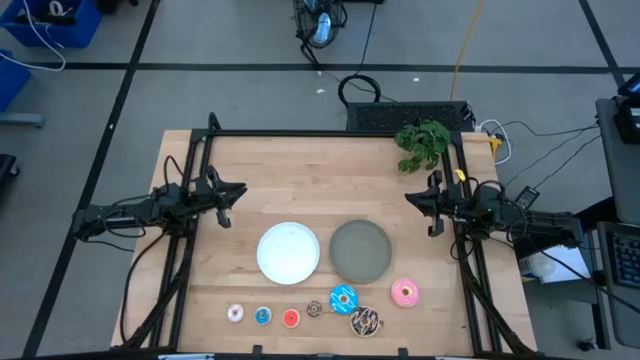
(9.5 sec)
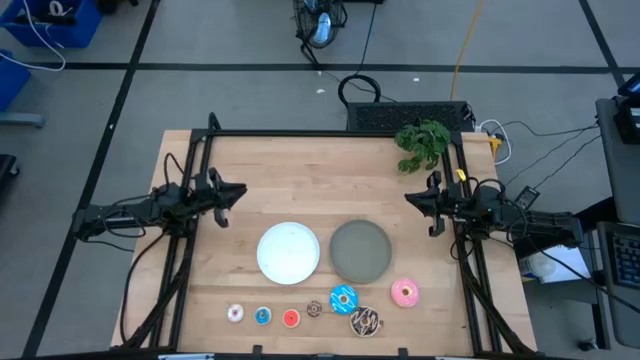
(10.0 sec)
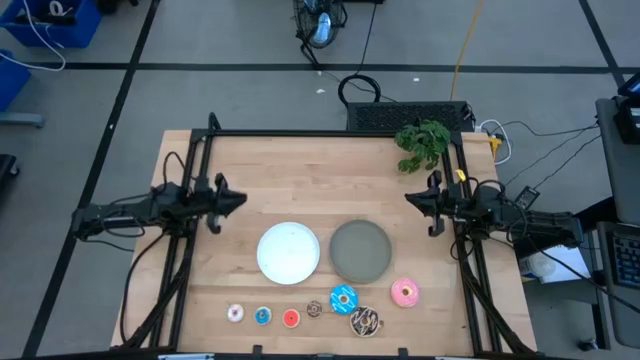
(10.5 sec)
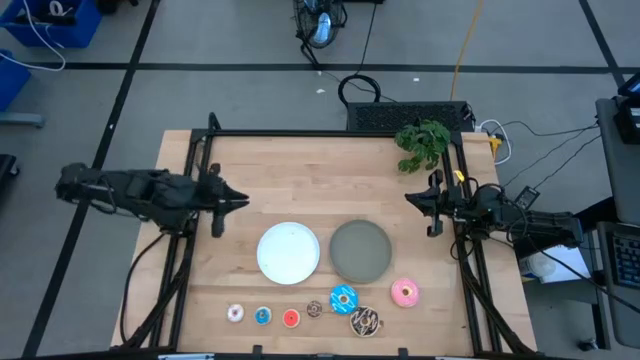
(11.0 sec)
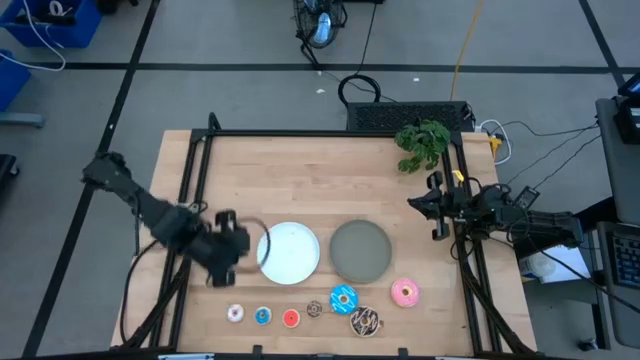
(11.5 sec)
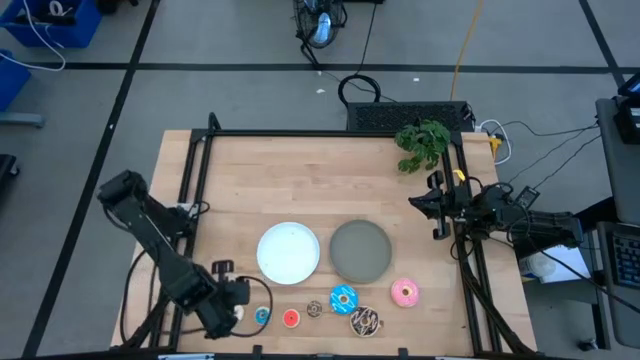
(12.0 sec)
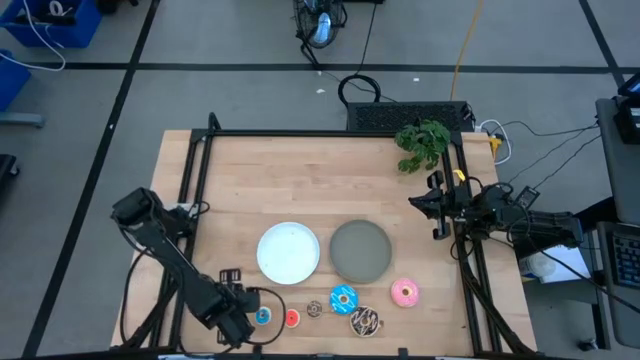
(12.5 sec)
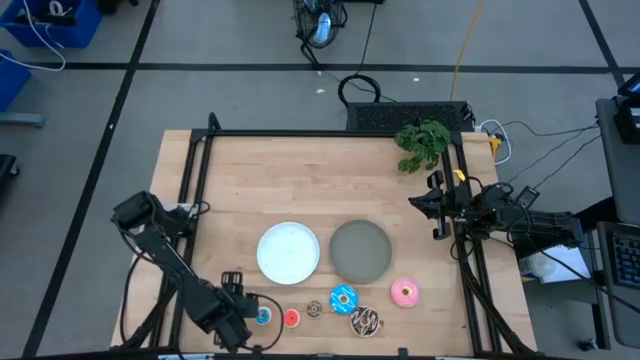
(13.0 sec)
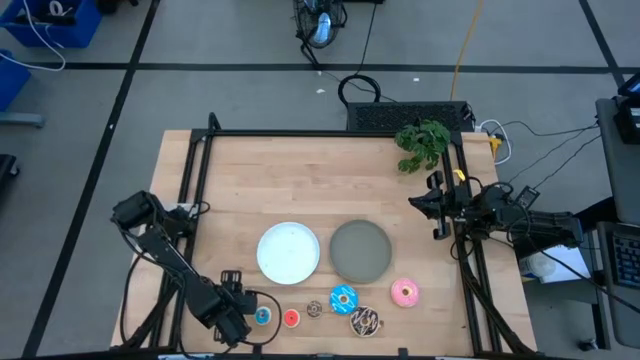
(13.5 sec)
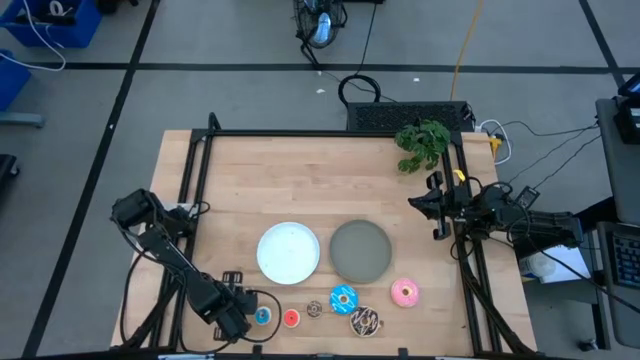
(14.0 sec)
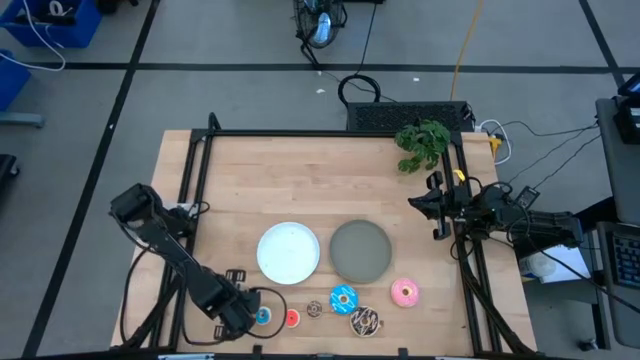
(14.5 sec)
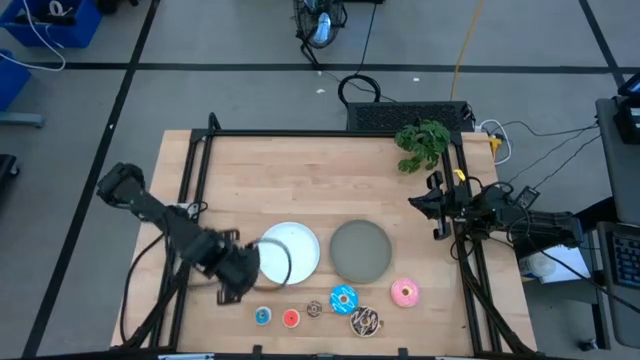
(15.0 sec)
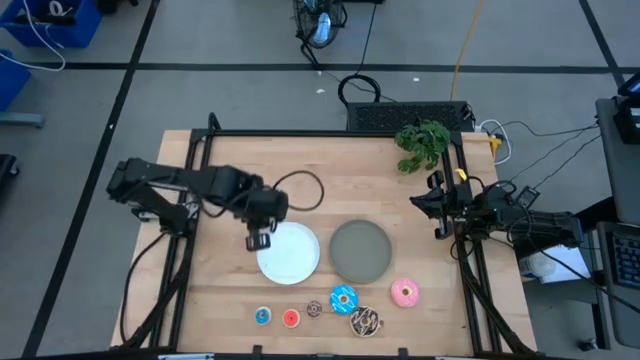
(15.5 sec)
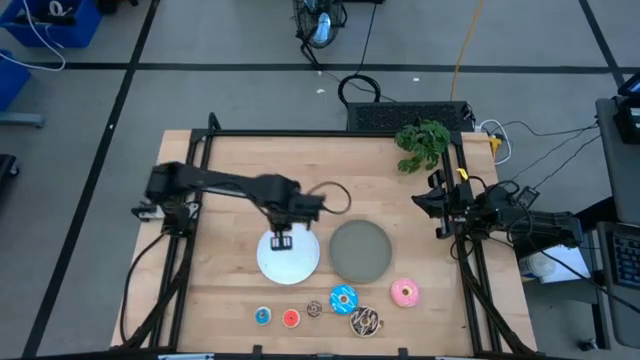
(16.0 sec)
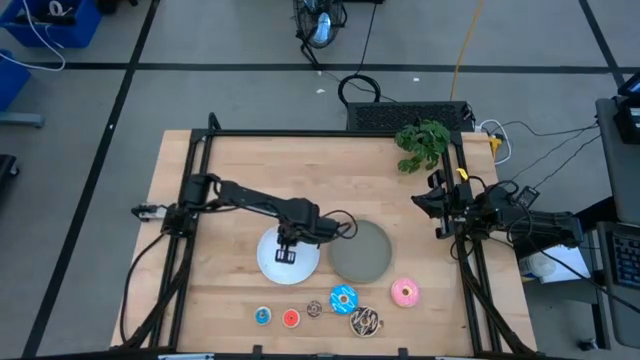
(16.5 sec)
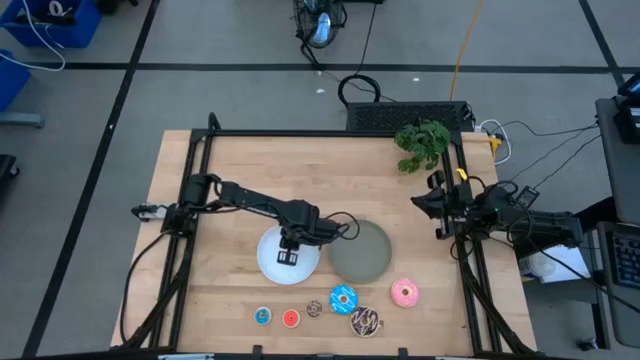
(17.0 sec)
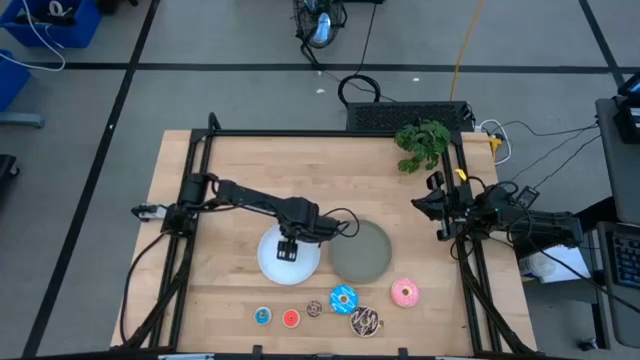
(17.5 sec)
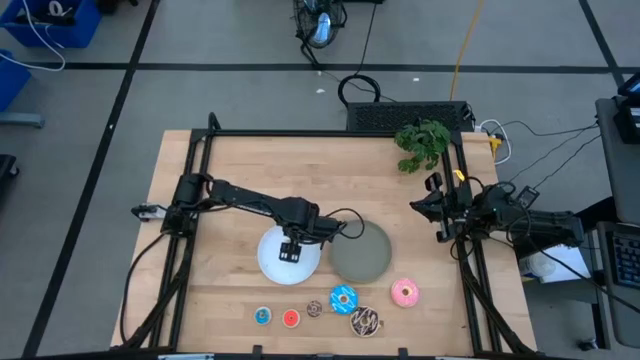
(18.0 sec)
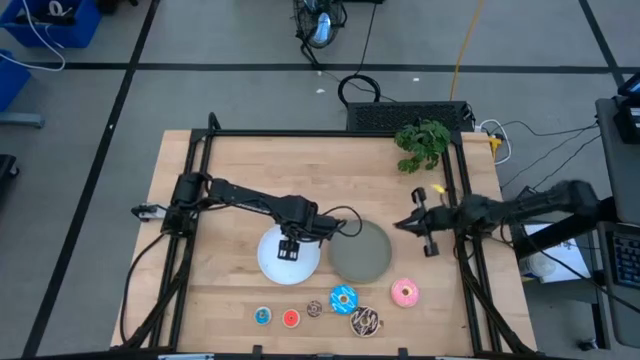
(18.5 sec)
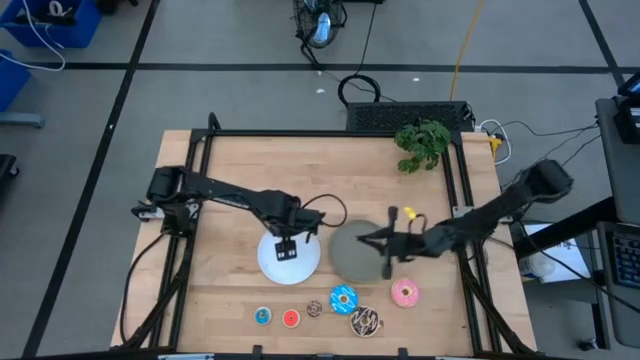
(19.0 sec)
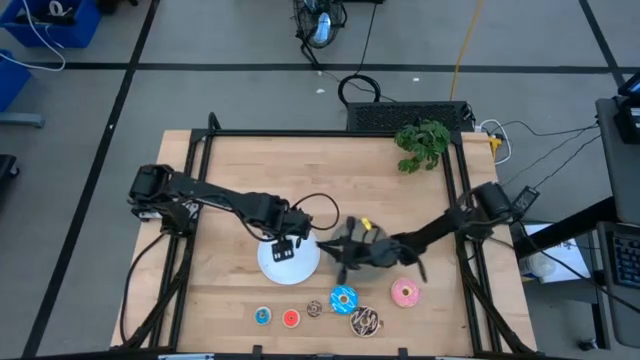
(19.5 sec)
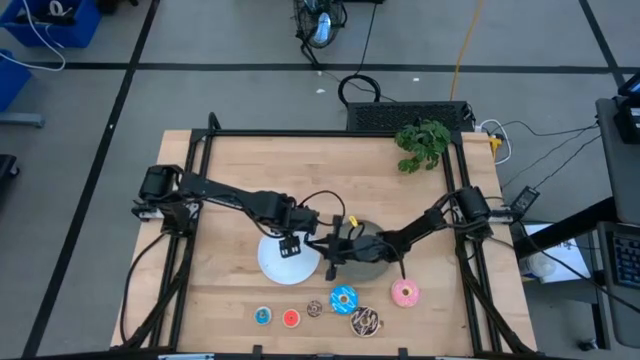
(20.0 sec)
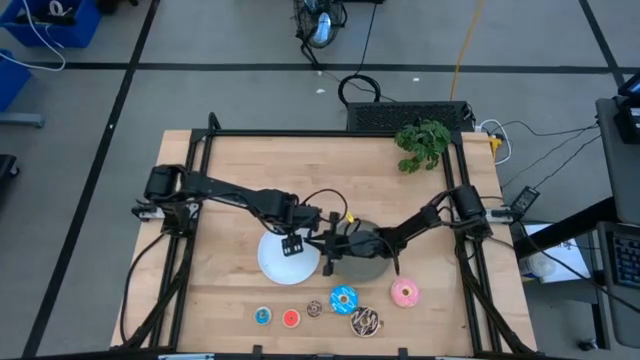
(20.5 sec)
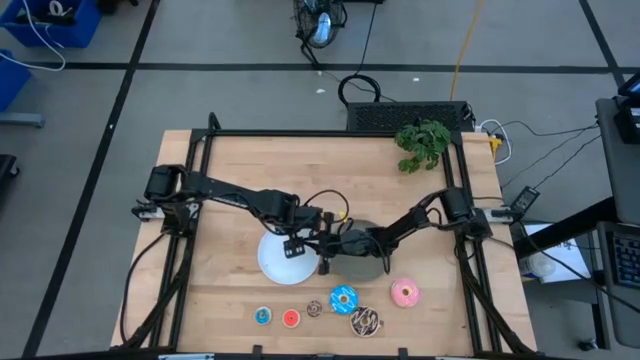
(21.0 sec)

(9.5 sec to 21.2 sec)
Task: Pick & Place donuts
Put the small white donut on the white plate

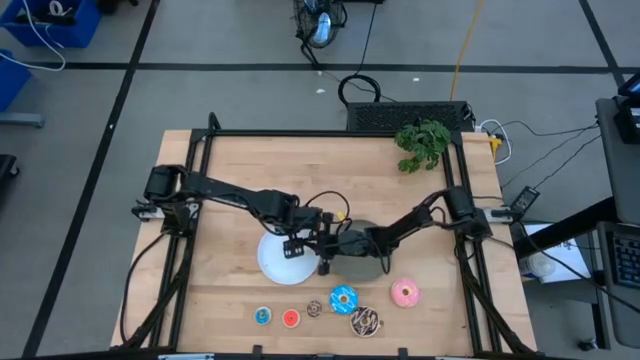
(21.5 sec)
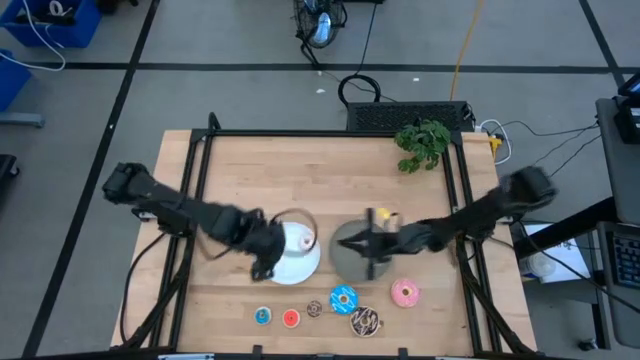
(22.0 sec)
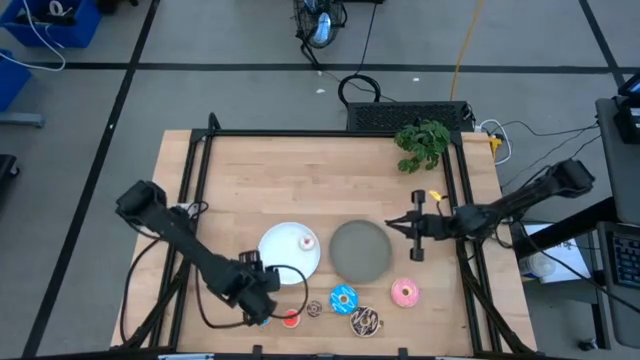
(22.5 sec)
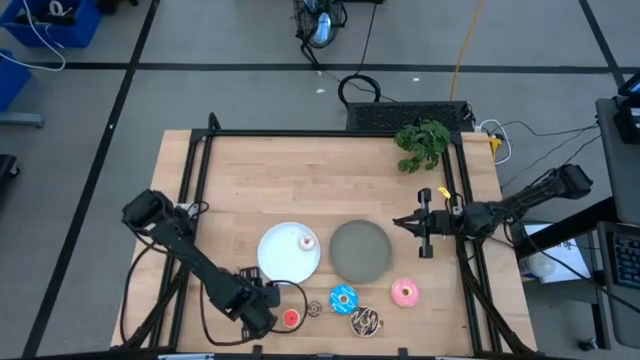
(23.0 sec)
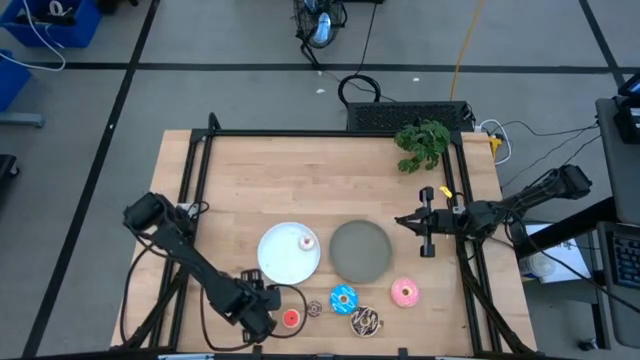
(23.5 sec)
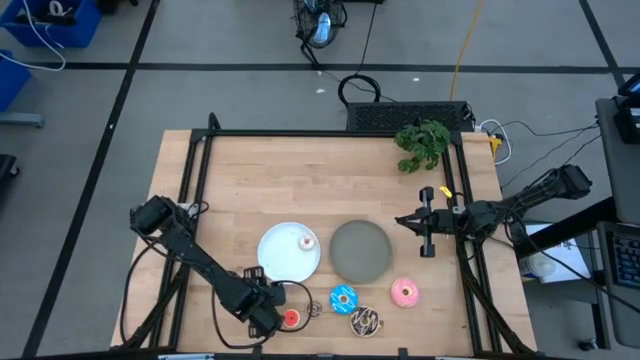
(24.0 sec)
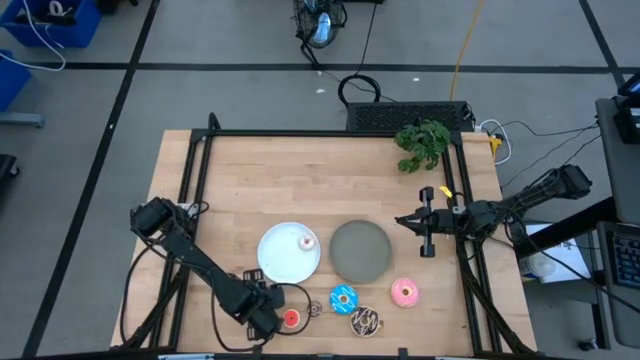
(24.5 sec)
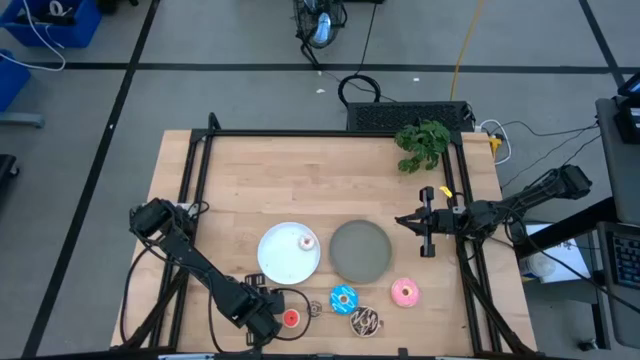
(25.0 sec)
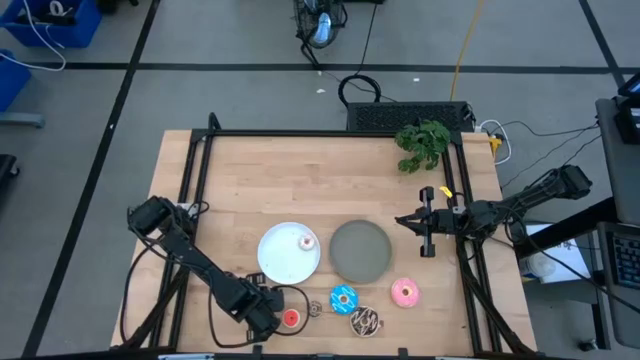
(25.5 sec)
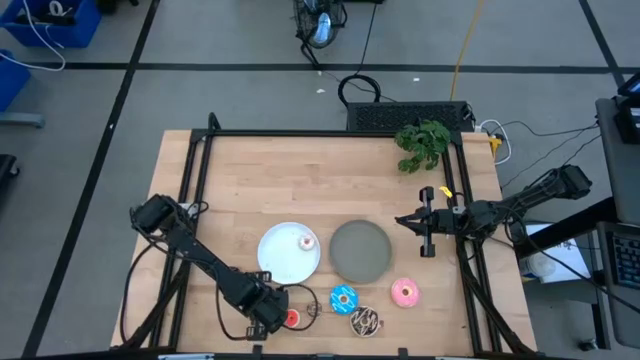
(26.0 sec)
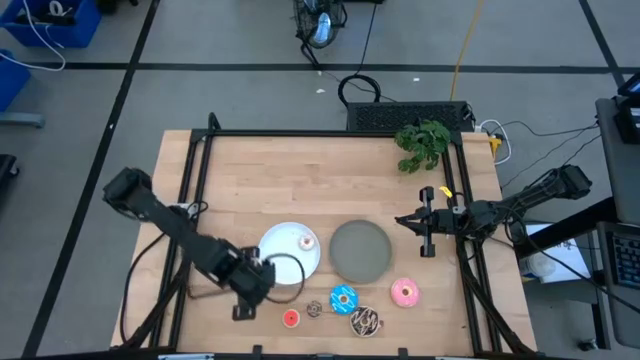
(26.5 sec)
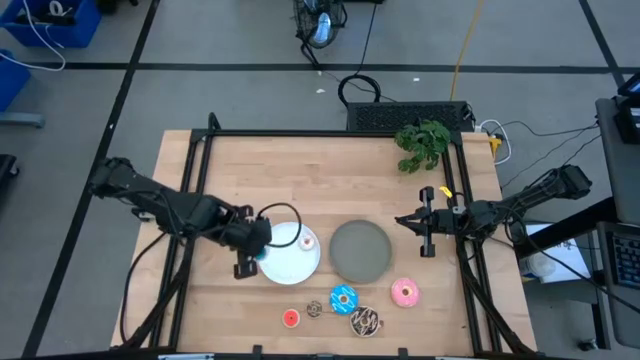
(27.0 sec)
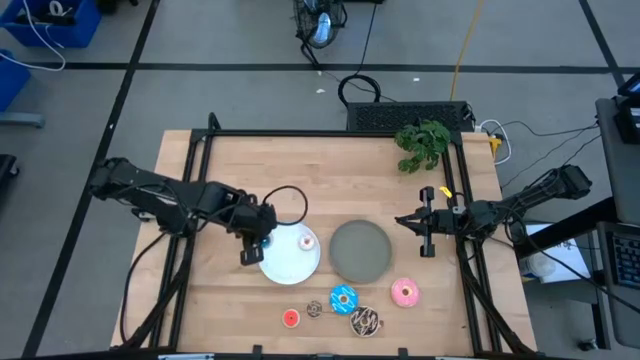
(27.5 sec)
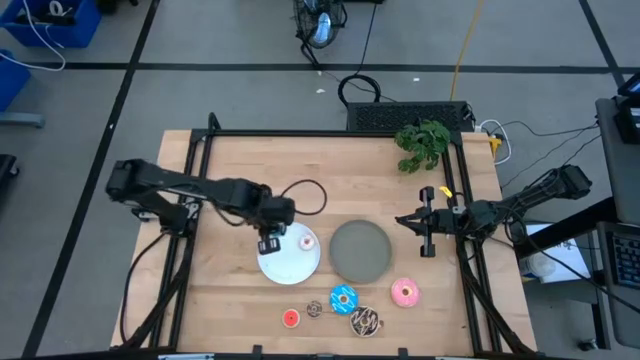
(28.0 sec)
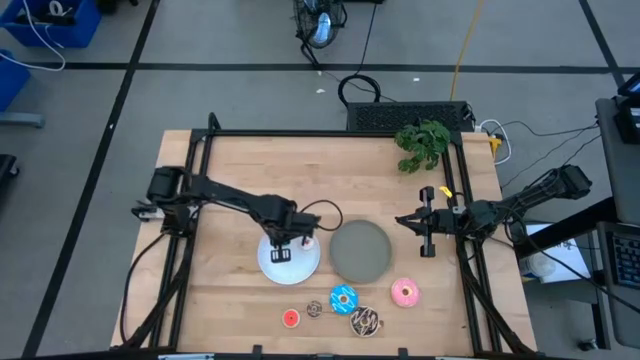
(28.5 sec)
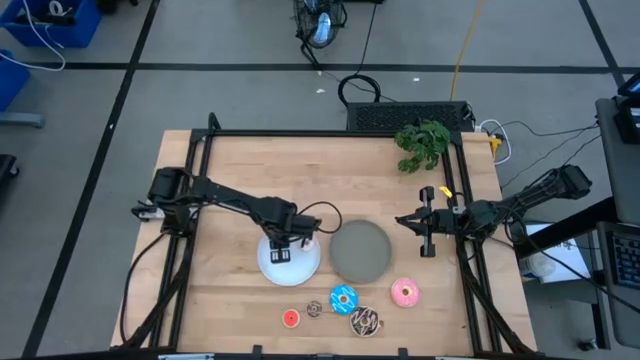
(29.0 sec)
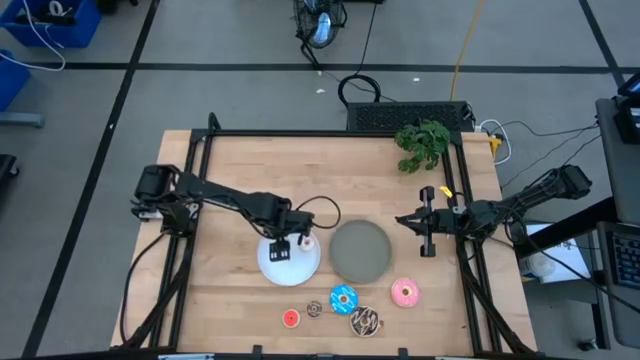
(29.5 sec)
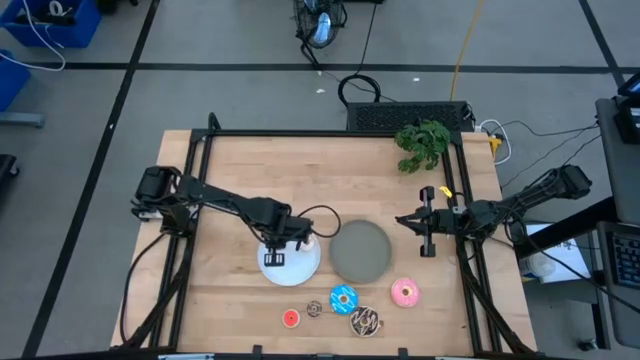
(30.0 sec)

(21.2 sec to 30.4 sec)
Put the small blue donut on the white plate
